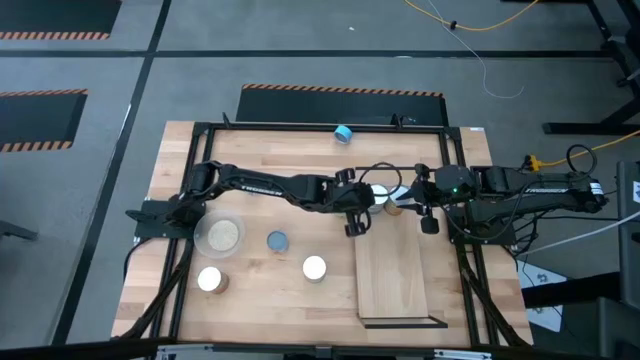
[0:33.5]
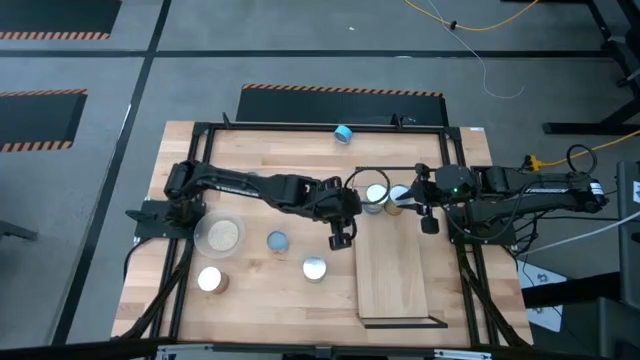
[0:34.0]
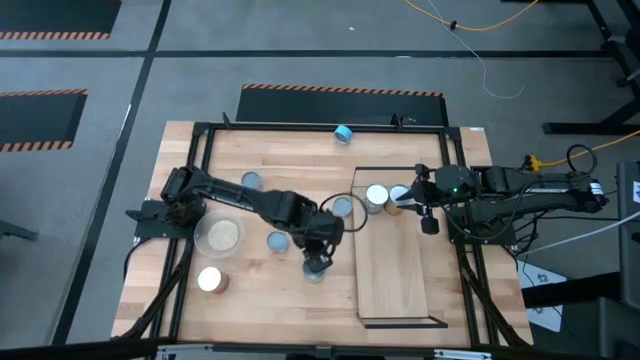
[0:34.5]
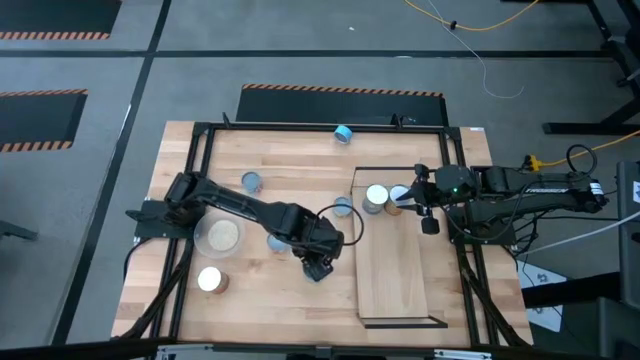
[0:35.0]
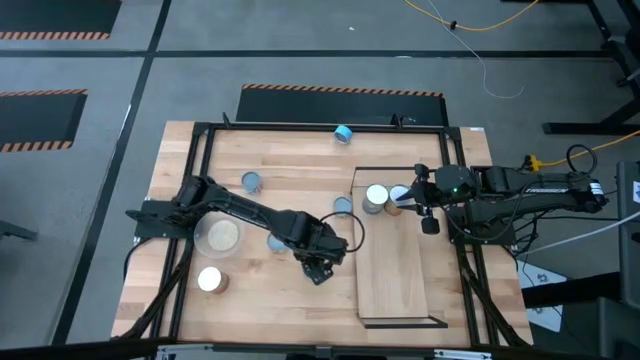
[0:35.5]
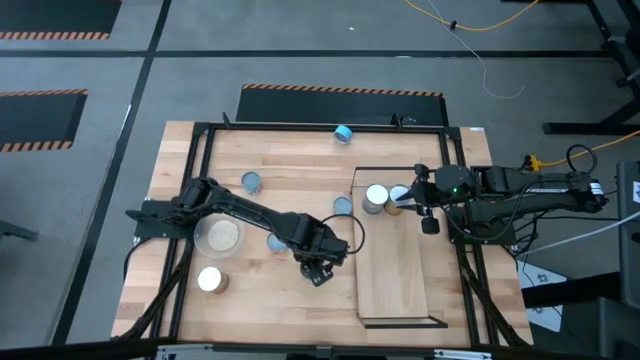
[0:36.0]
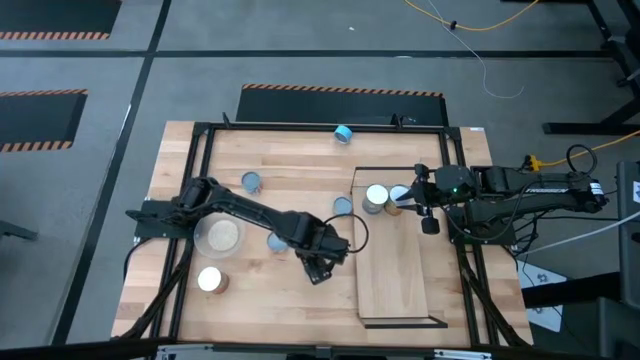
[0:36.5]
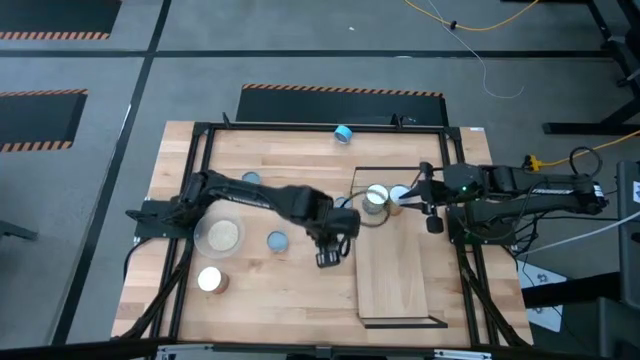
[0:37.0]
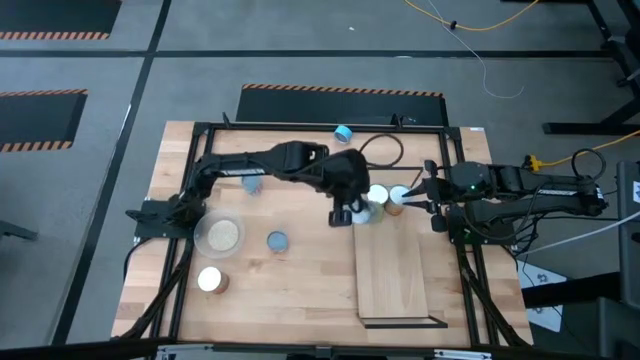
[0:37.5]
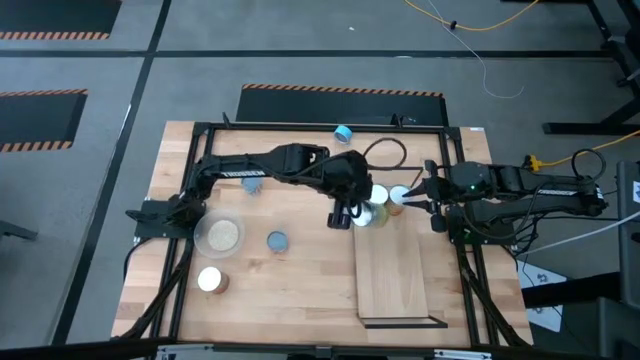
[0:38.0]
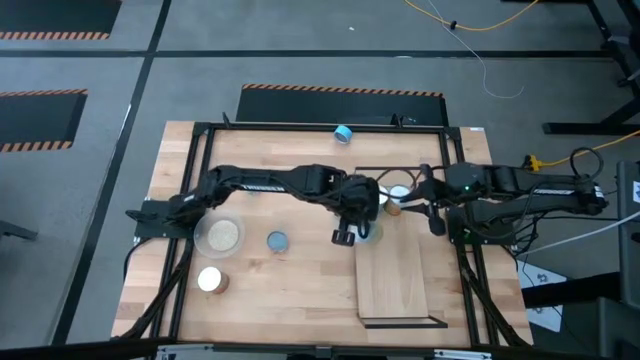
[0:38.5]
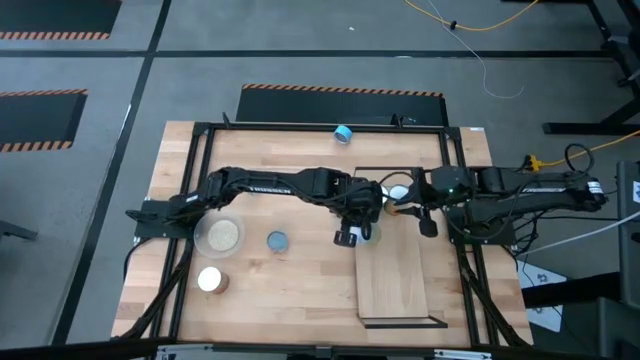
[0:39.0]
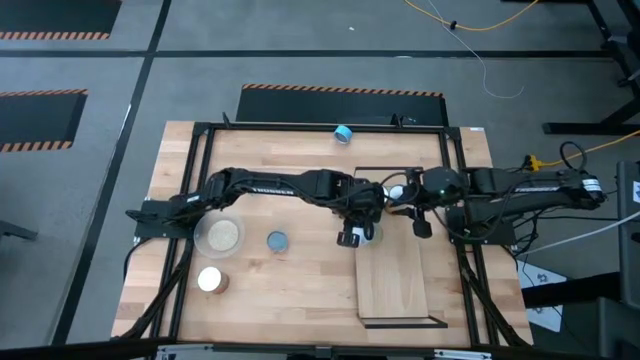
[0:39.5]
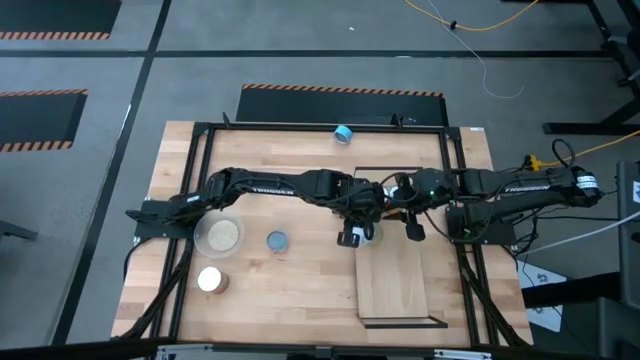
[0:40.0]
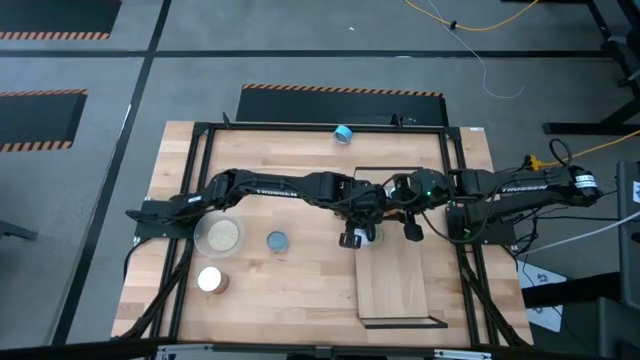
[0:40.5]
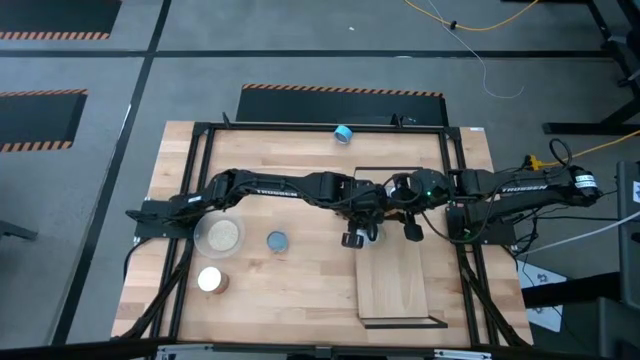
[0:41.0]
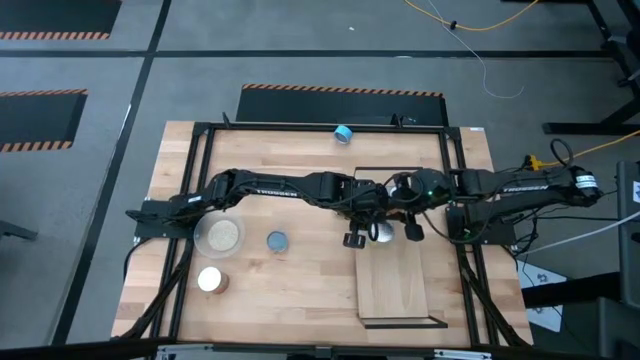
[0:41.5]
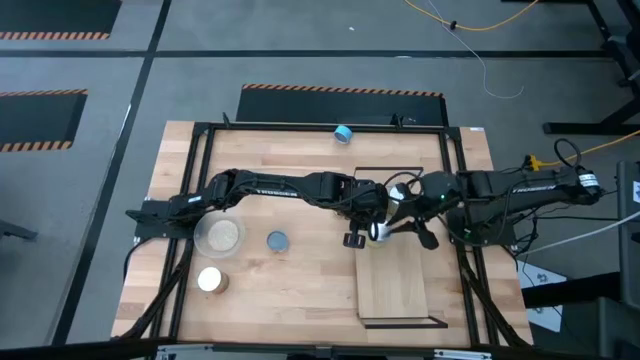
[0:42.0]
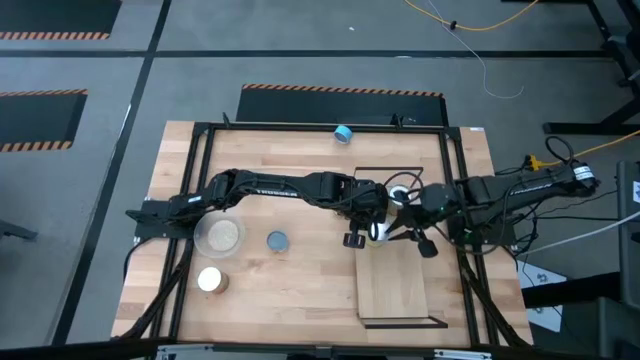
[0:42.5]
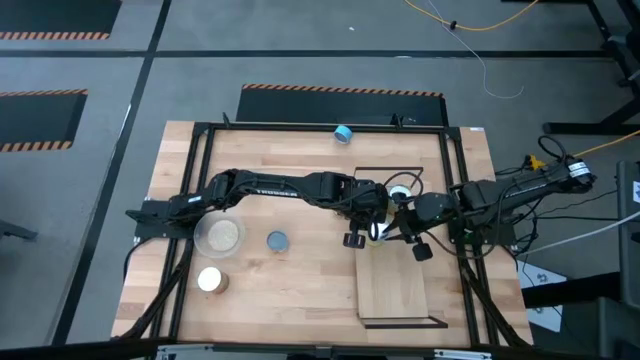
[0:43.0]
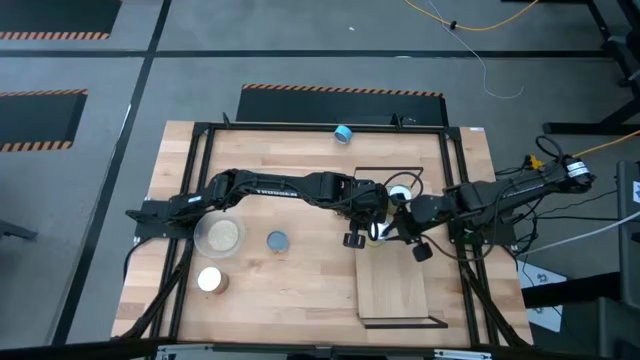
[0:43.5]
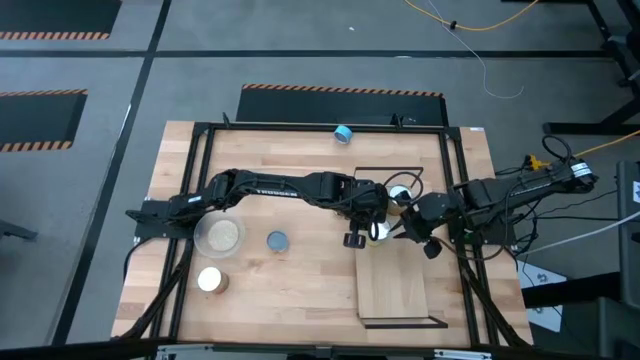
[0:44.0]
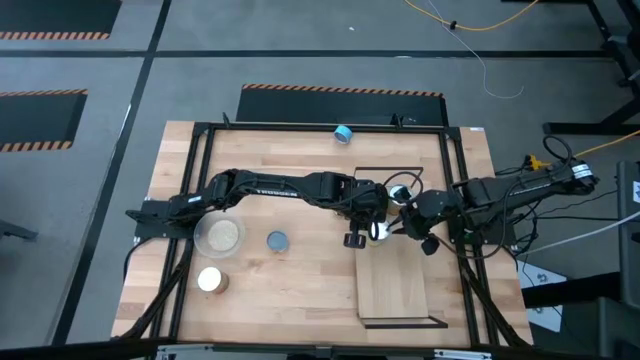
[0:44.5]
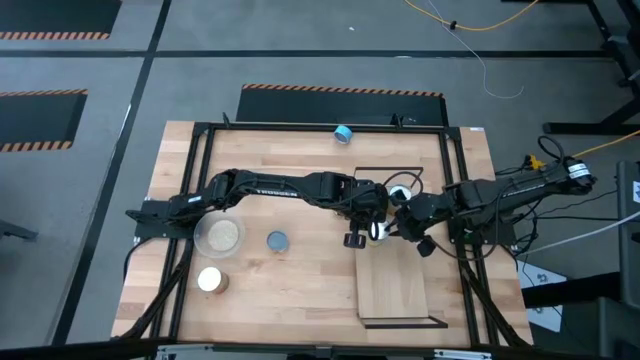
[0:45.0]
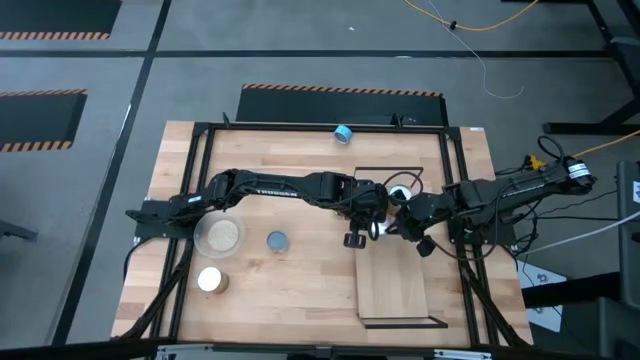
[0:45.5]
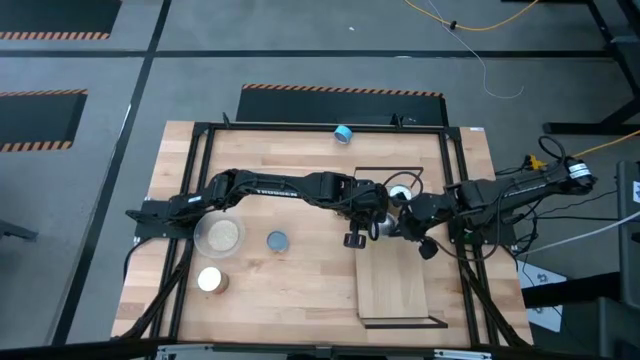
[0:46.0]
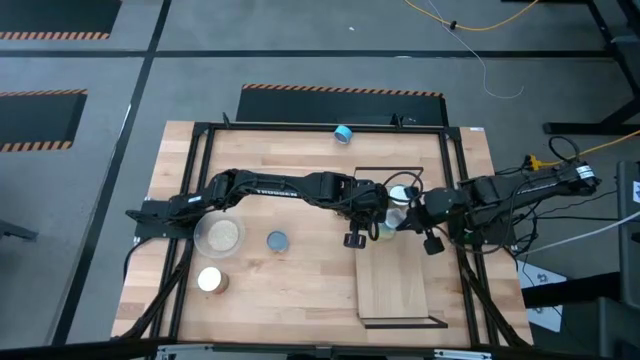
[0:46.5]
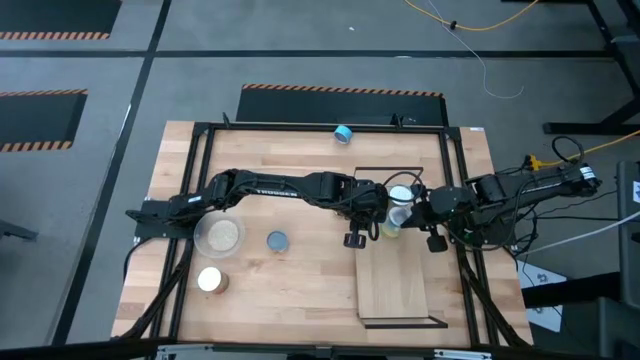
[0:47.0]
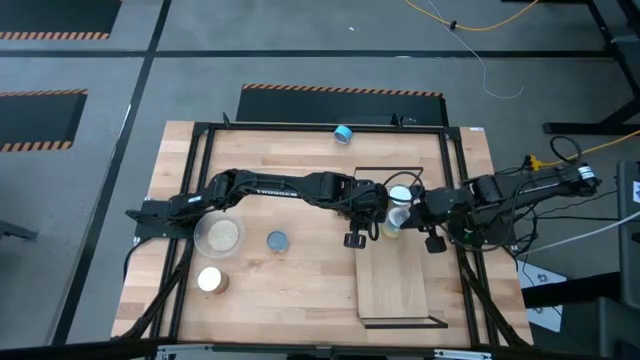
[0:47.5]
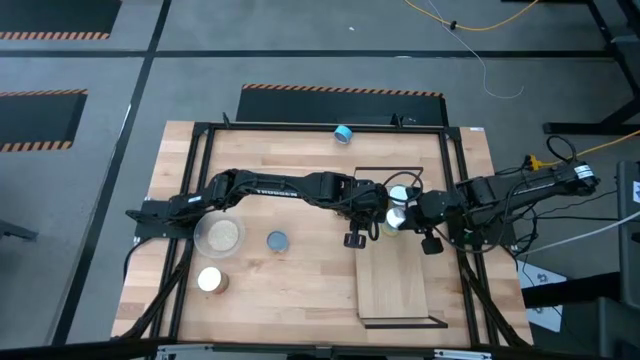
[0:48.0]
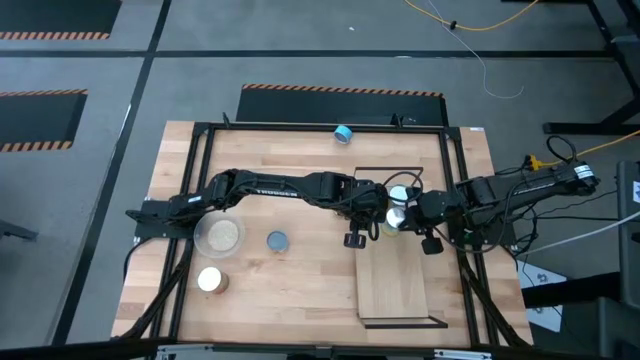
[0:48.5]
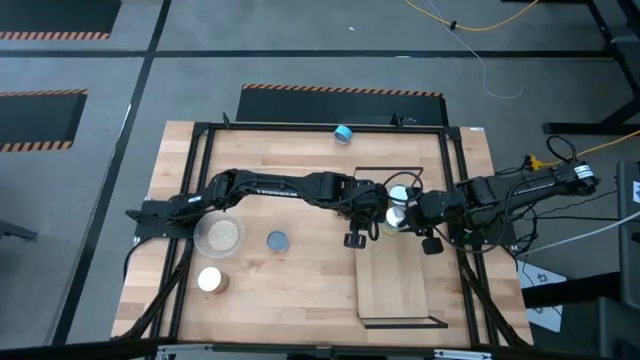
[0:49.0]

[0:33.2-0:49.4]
Task: Pick and place cans onto a shelf
Put the light blue can onto the shelf
